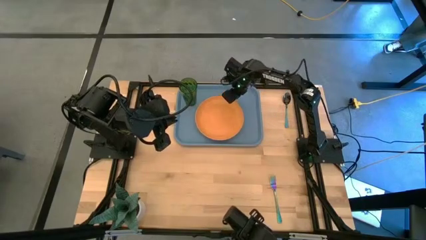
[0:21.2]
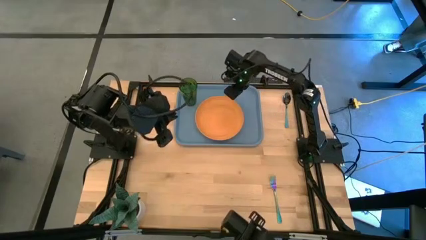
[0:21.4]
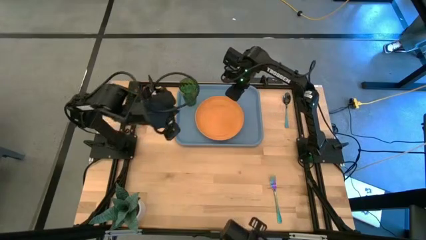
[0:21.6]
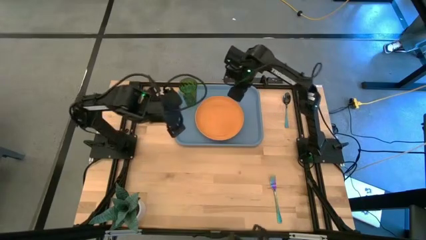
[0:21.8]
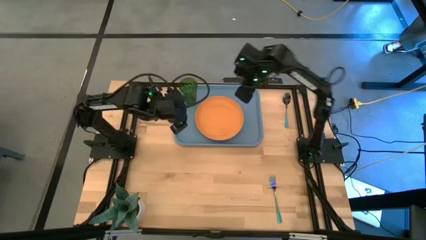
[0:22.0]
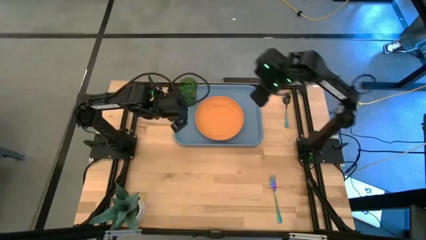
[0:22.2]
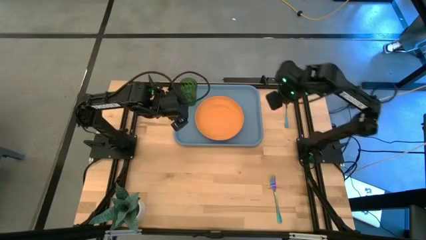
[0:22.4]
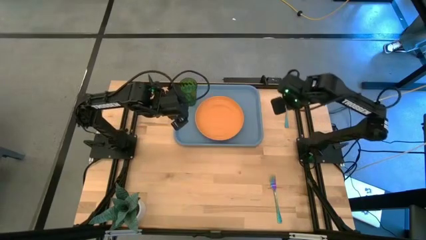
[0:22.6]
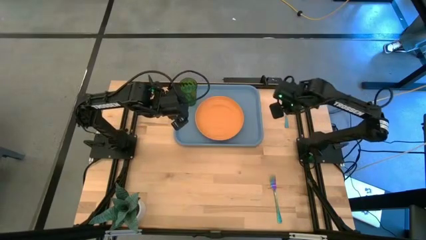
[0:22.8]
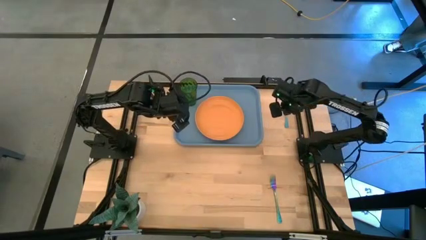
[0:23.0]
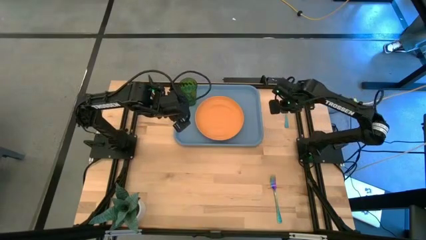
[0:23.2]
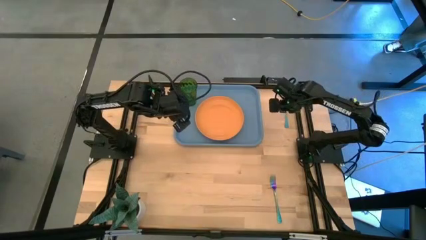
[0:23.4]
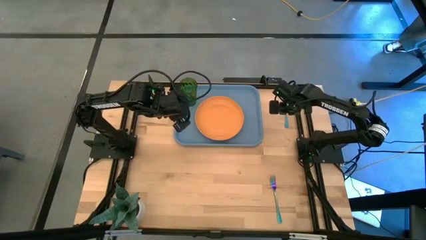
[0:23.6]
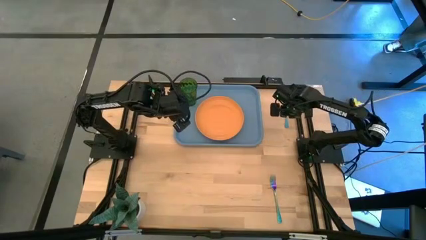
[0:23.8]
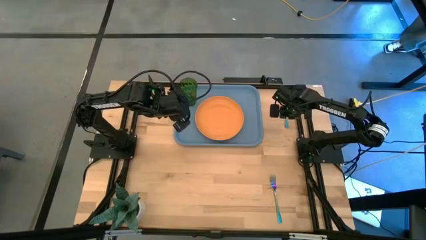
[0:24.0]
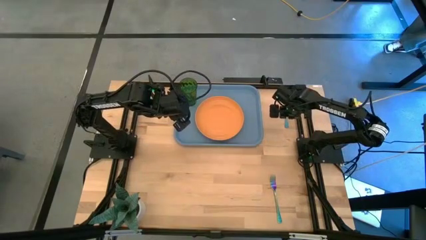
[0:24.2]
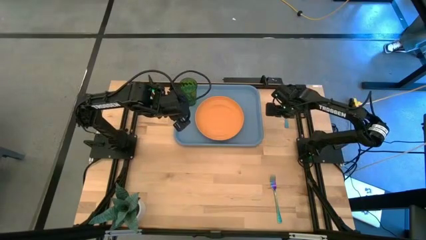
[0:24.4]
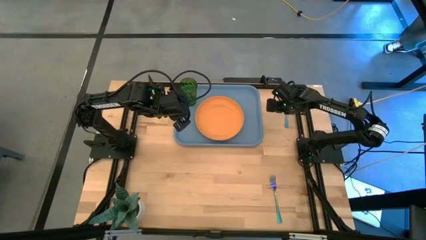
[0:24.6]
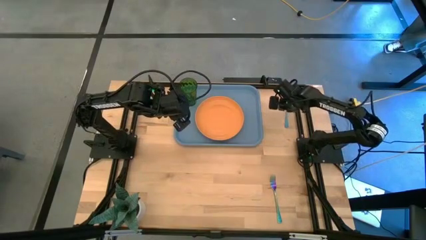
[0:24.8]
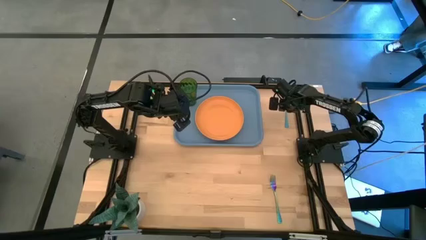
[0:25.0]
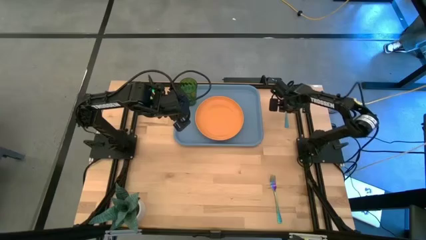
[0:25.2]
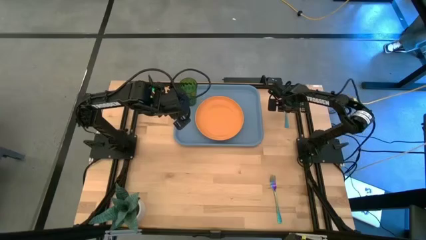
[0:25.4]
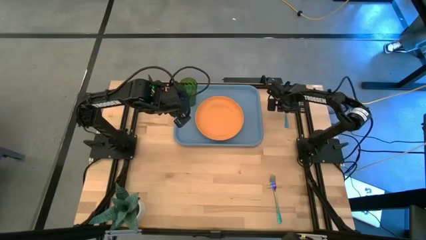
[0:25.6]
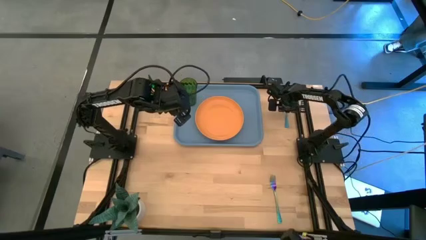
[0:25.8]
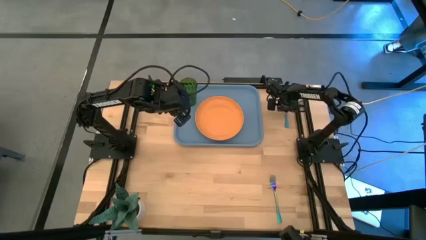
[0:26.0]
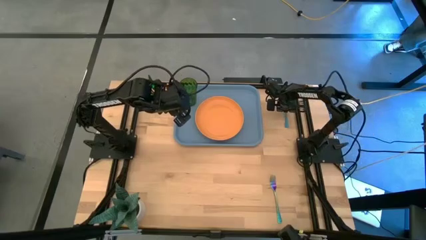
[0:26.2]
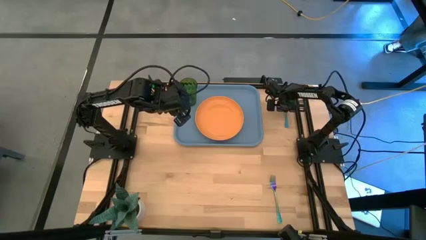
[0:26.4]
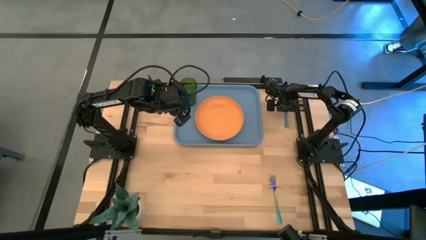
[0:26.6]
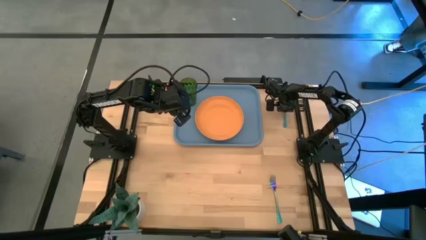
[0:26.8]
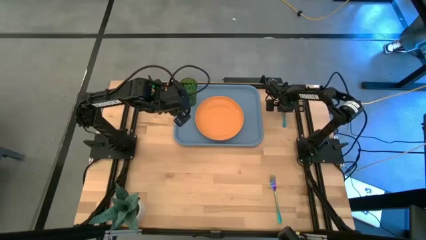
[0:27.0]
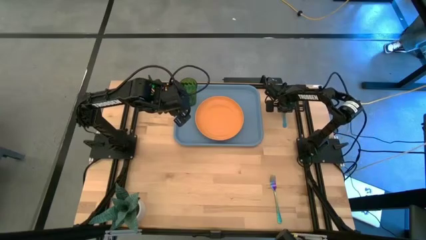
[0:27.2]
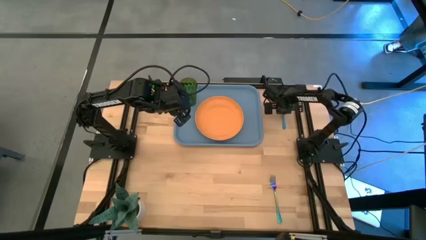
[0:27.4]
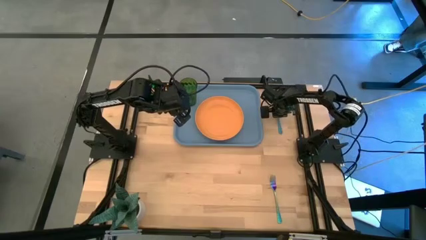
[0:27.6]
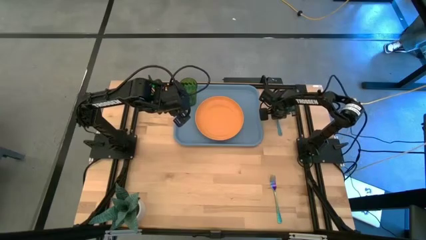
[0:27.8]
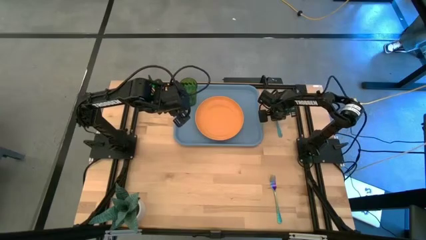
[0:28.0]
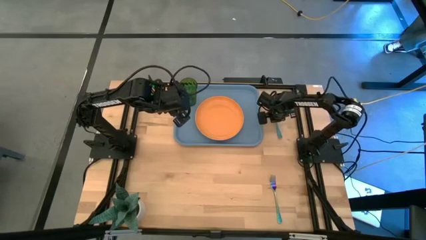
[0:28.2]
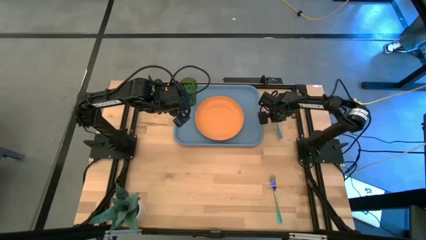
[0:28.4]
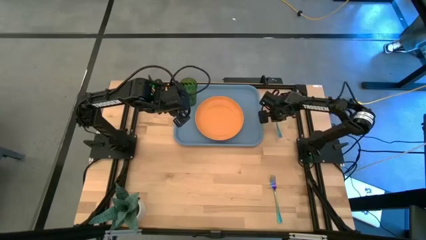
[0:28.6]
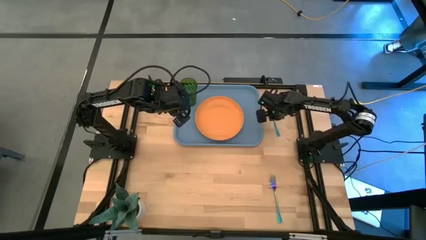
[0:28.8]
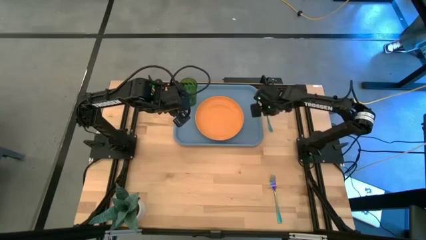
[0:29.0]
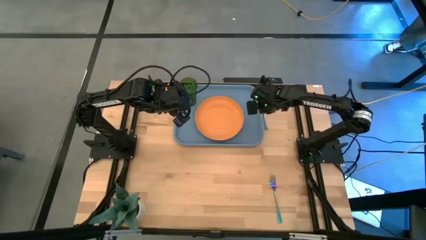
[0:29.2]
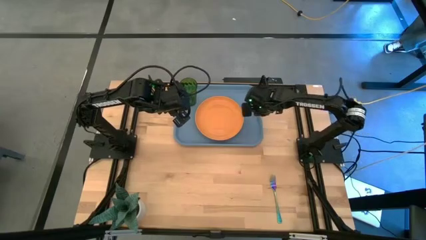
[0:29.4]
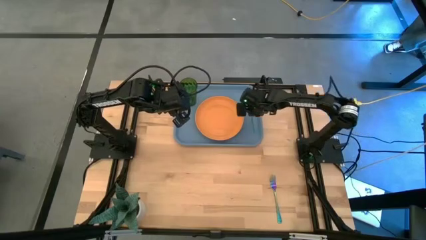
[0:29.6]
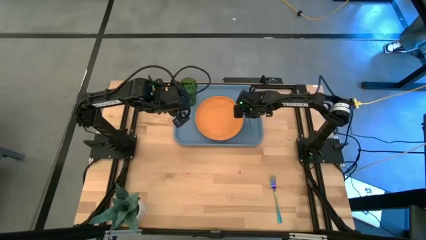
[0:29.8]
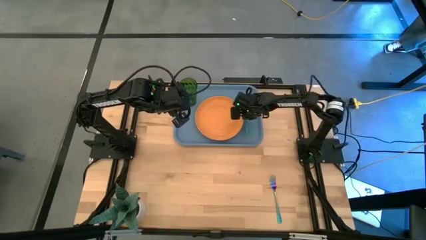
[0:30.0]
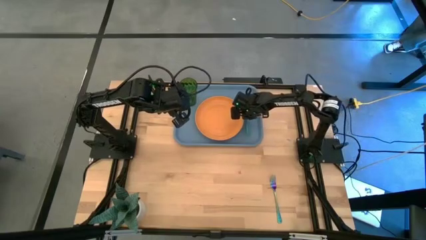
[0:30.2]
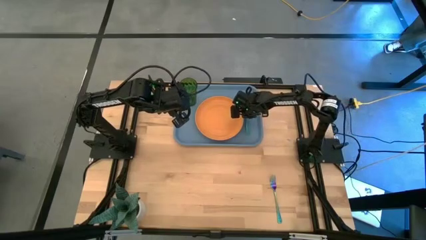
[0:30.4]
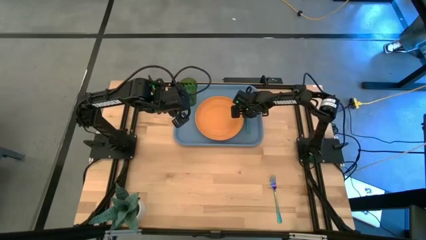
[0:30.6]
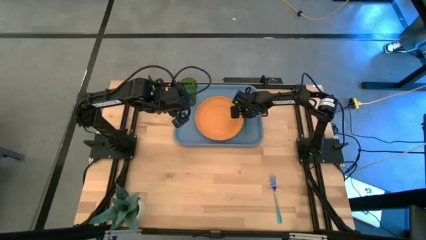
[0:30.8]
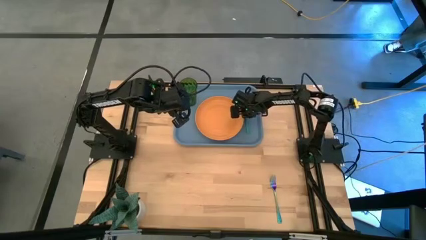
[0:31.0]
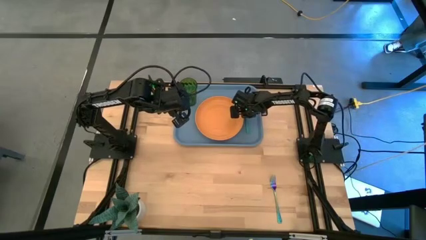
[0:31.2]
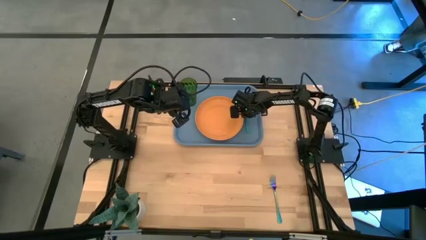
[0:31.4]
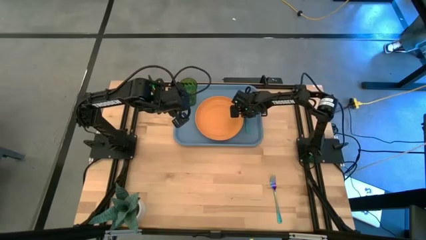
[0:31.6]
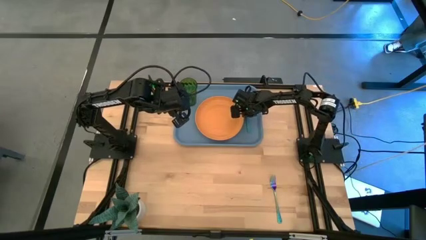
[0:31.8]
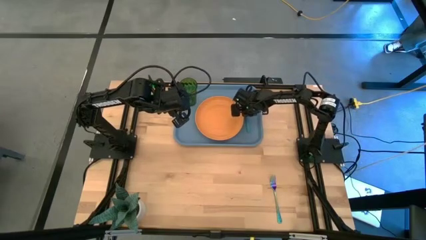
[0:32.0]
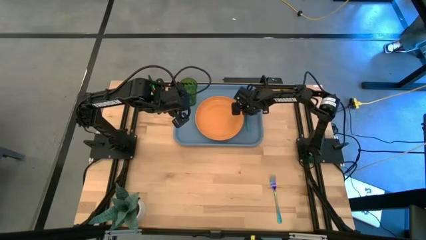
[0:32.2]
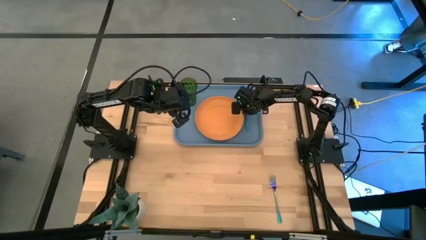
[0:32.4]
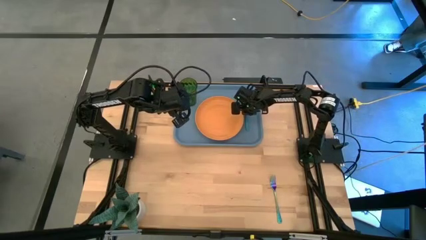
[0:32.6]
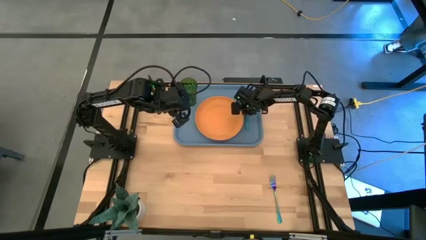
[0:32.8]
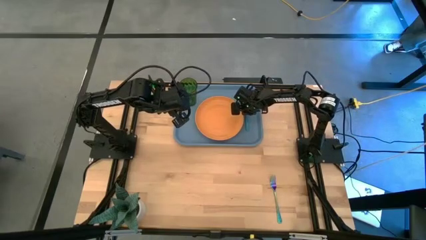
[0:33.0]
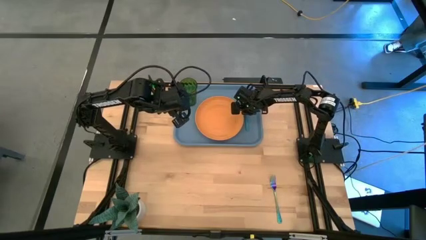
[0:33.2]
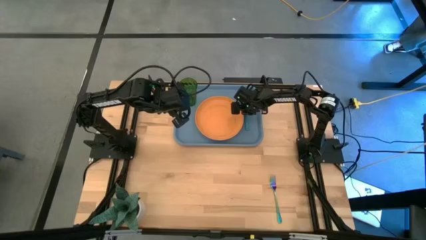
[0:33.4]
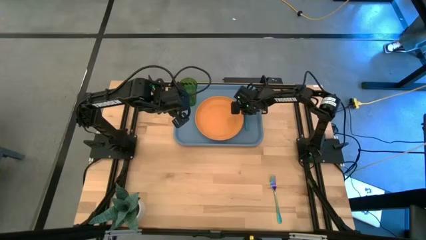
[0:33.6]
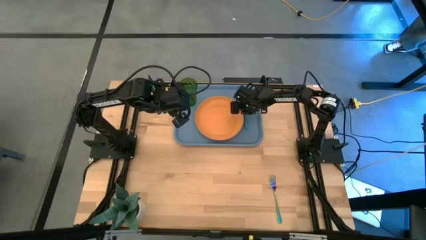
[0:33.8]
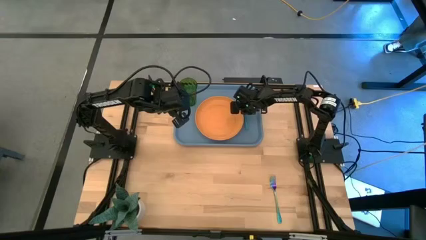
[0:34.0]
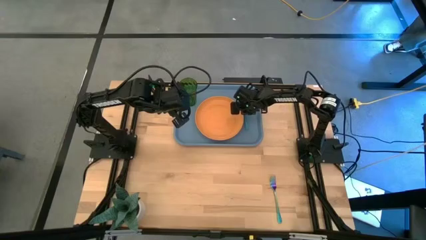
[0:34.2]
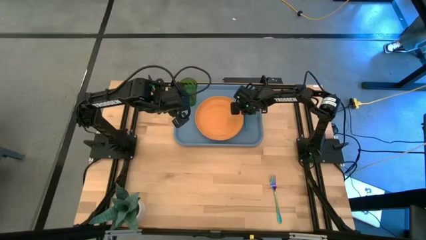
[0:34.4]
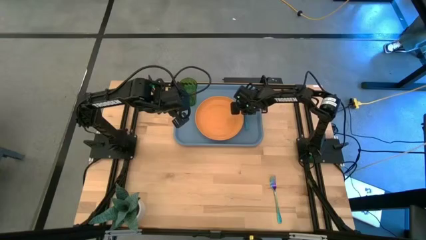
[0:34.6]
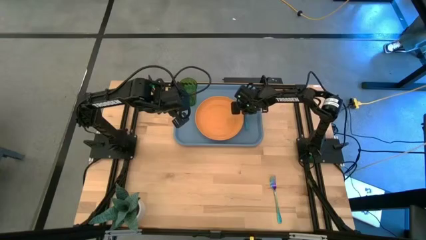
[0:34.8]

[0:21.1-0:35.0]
Task: Pick and place plate/cup/fork/spoon on tray
Put the blue spoon on the blue tray

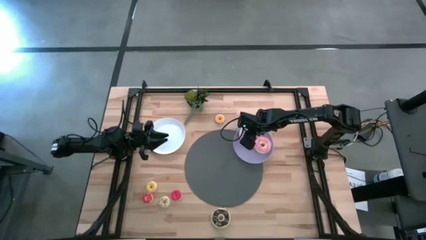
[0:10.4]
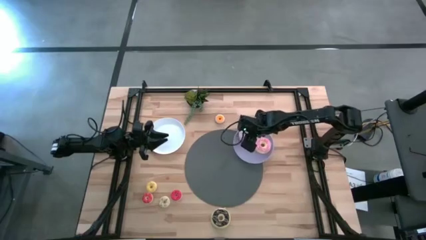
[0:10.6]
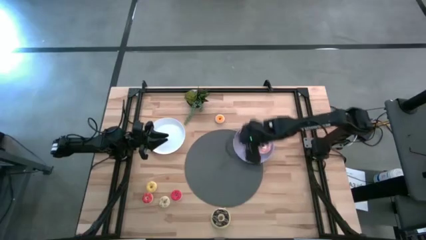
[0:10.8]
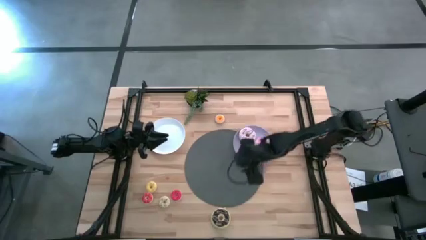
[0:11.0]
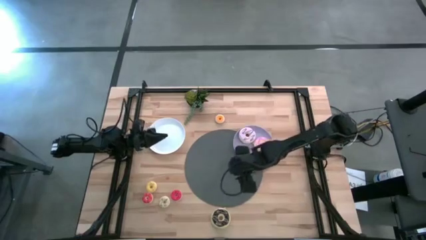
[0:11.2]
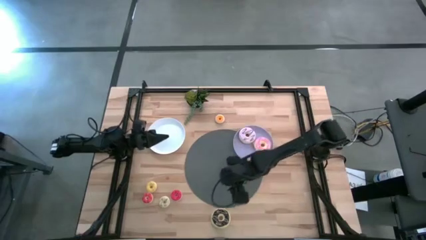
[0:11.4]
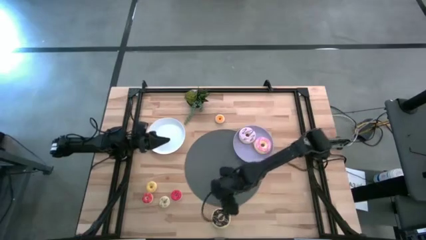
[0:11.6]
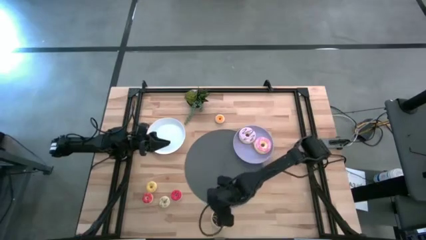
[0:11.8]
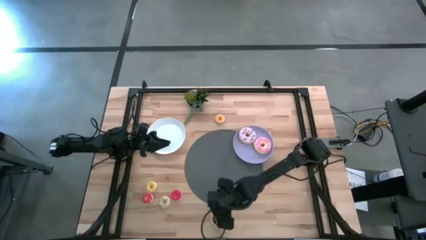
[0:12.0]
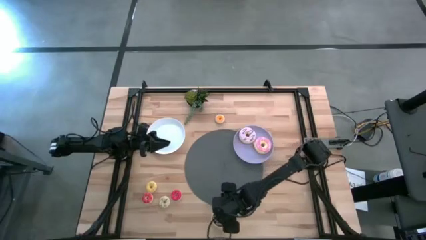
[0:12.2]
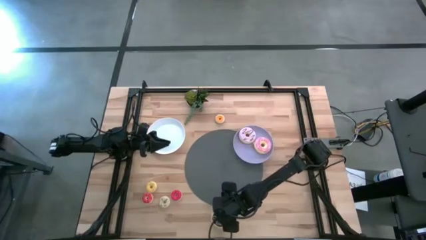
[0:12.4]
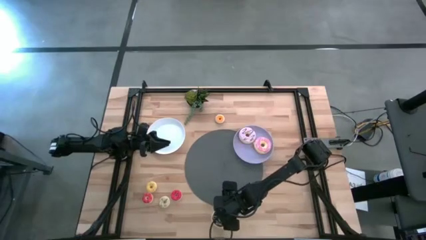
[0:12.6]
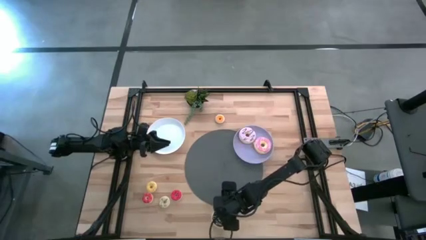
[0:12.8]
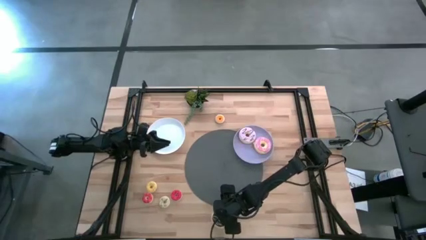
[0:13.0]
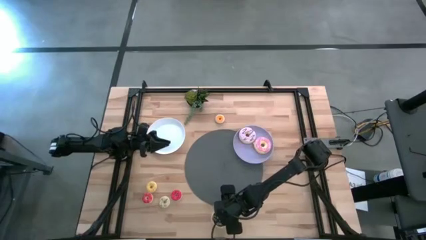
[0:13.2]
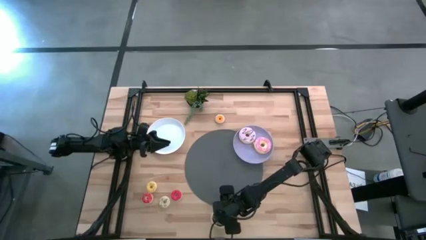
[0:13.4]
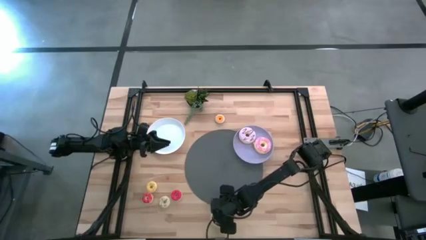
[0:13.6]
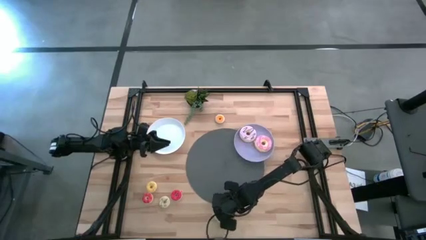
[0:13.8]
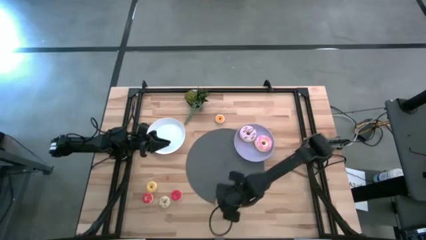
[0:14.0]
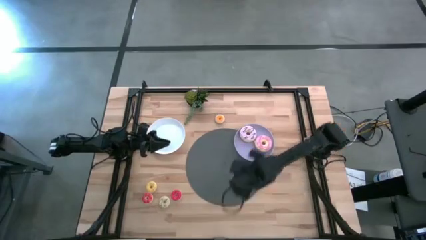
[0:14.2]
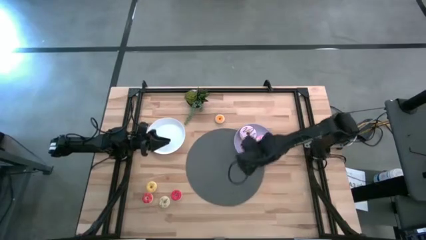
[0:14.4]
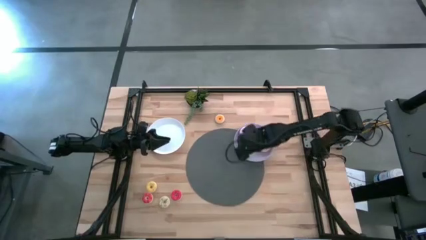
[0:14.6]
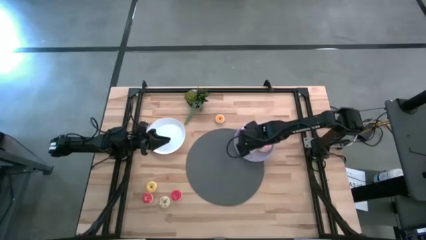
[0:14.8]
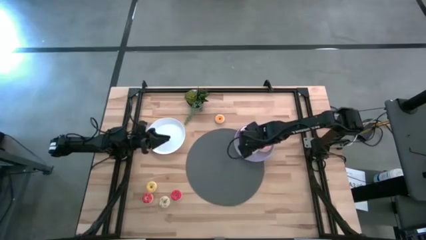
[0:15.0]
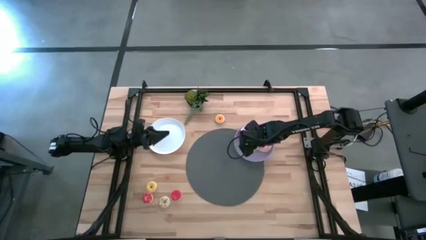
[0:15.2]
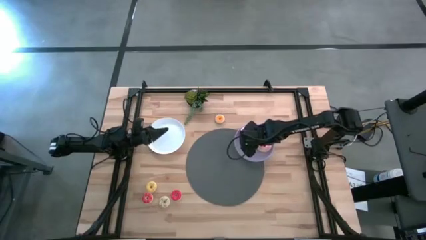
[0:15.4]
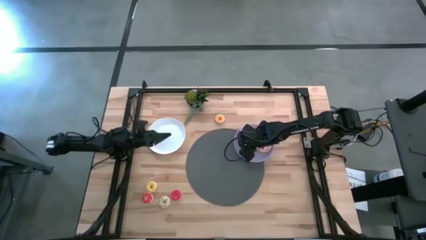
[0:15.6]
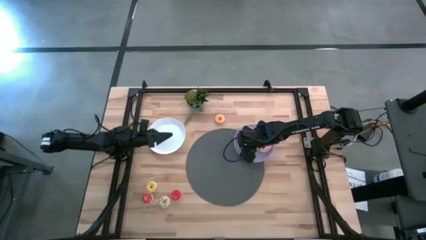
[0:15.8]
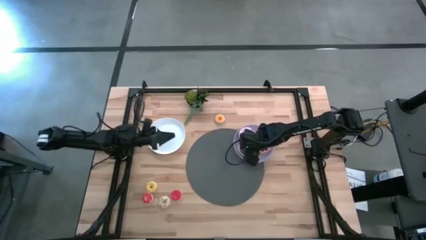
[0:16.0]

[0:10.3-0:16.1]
Task: Pick & Place donuts
Put the large black donut on the purple plate
